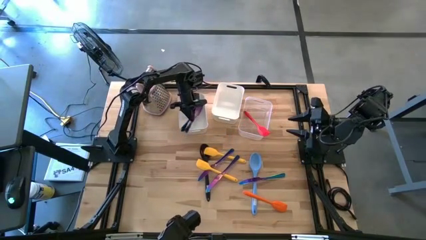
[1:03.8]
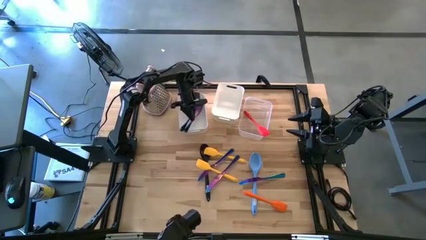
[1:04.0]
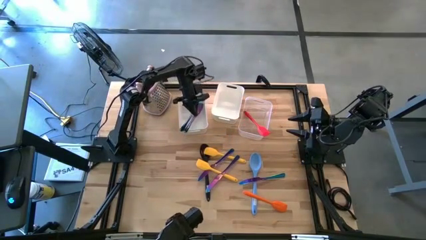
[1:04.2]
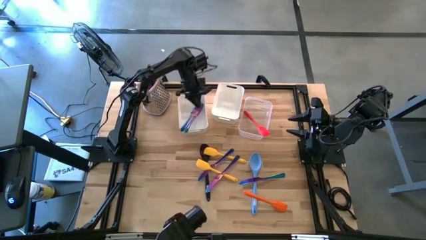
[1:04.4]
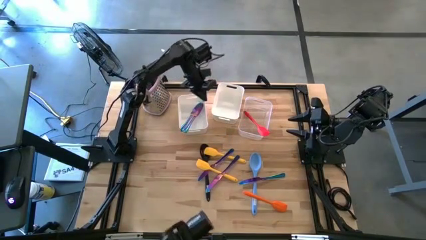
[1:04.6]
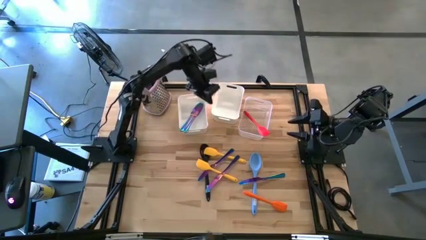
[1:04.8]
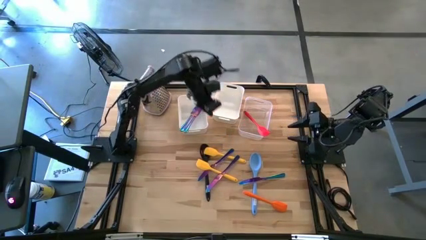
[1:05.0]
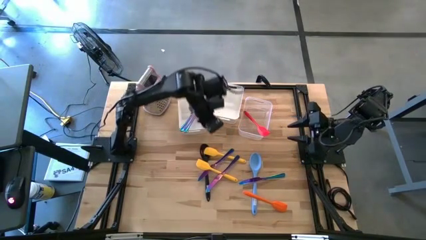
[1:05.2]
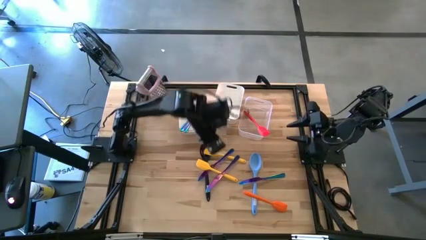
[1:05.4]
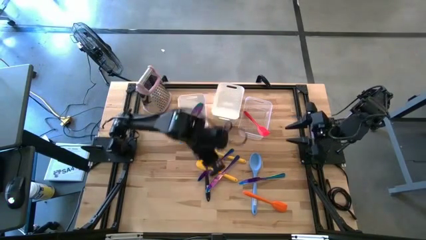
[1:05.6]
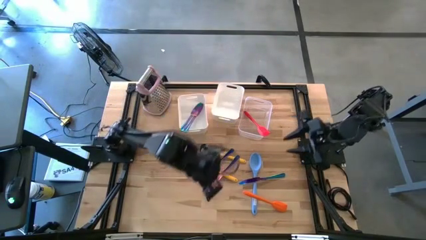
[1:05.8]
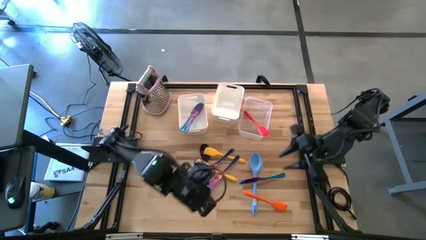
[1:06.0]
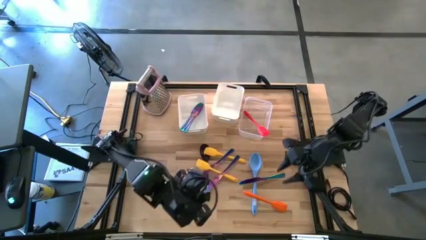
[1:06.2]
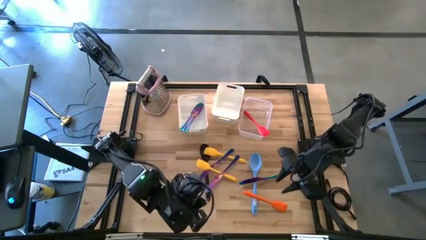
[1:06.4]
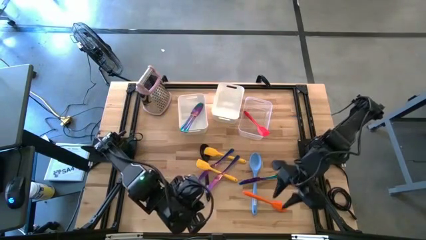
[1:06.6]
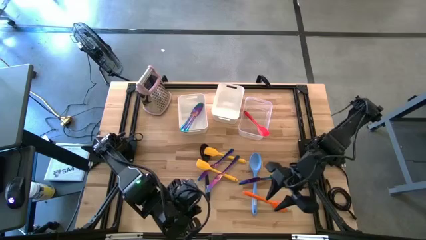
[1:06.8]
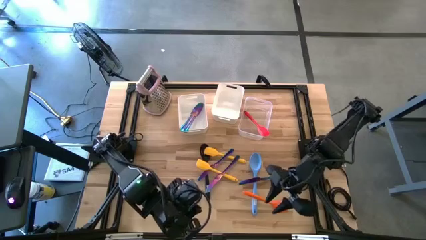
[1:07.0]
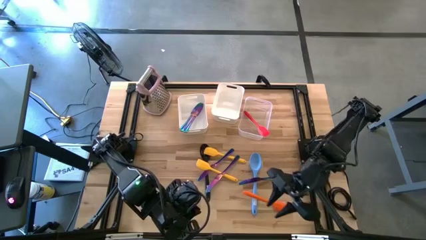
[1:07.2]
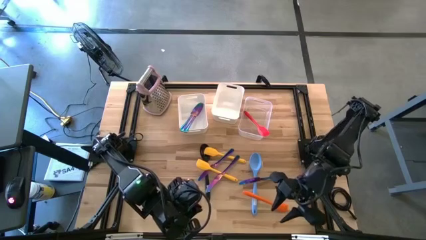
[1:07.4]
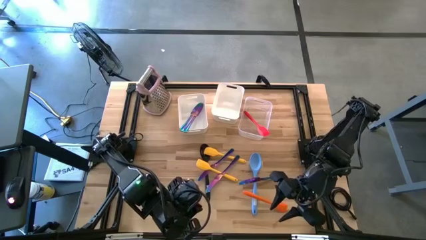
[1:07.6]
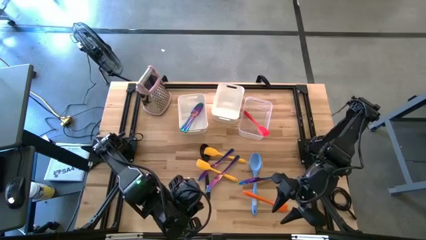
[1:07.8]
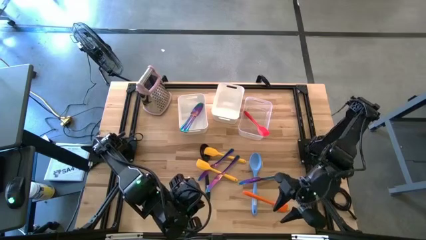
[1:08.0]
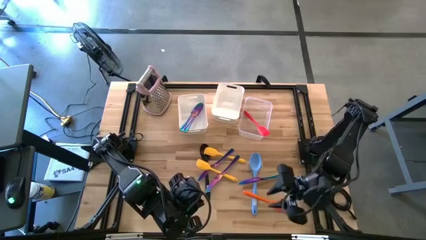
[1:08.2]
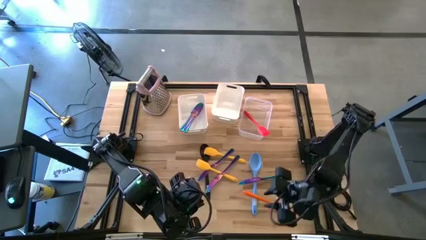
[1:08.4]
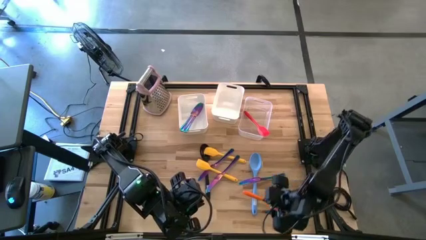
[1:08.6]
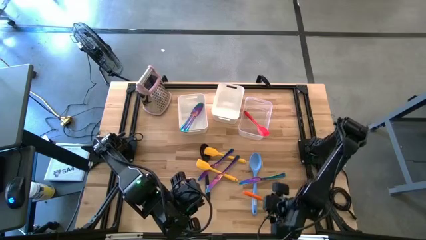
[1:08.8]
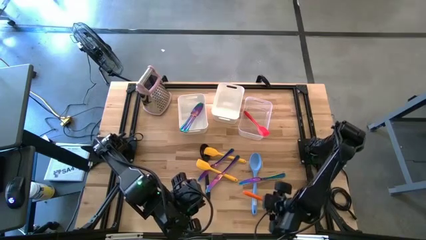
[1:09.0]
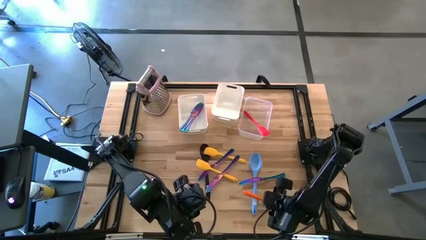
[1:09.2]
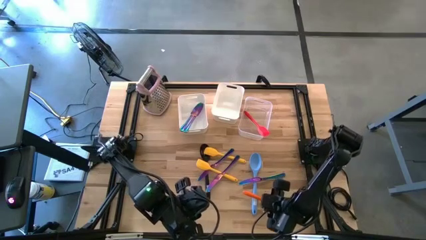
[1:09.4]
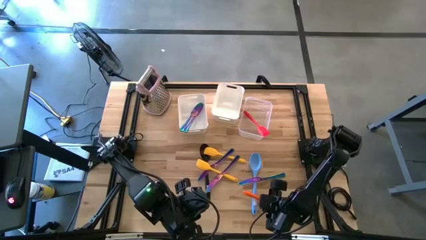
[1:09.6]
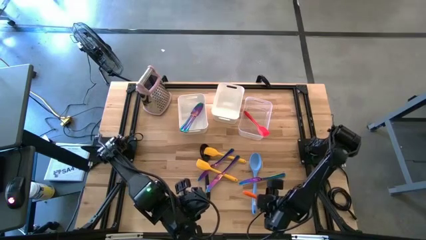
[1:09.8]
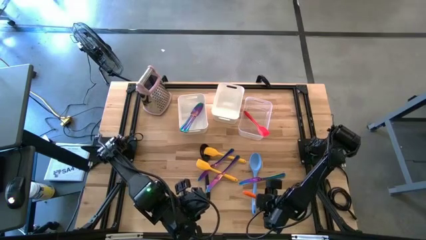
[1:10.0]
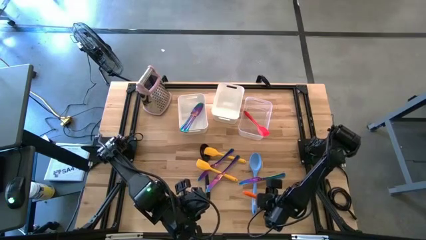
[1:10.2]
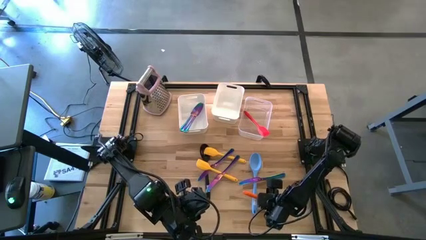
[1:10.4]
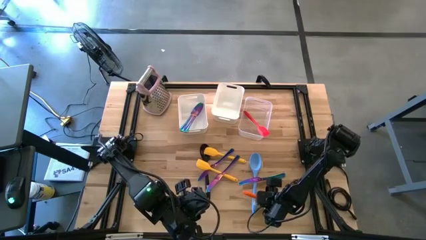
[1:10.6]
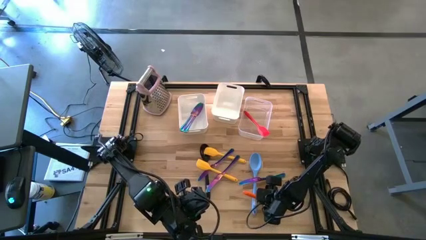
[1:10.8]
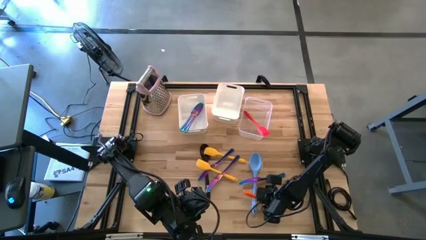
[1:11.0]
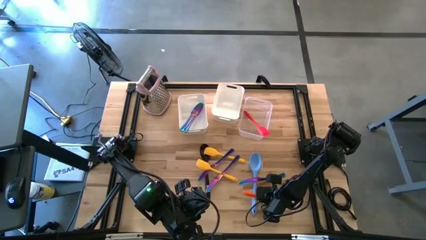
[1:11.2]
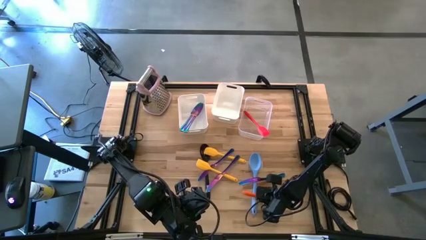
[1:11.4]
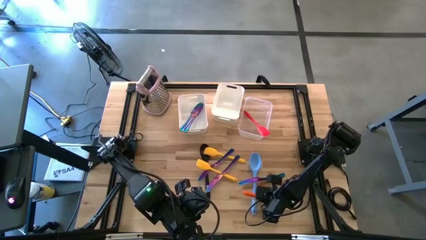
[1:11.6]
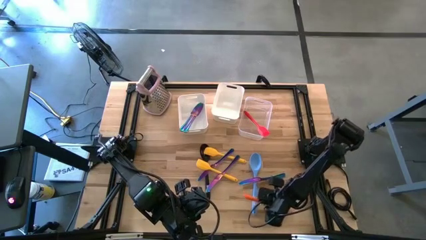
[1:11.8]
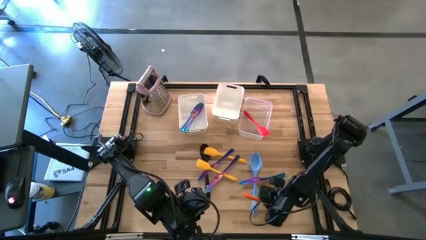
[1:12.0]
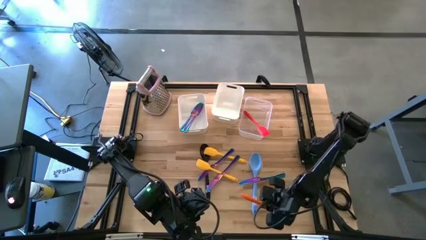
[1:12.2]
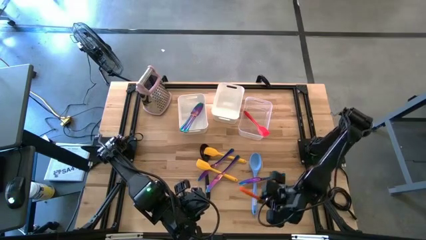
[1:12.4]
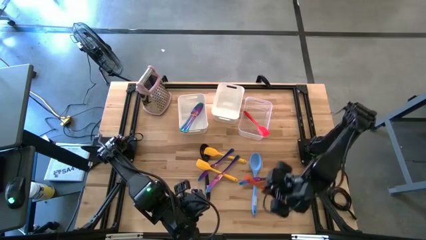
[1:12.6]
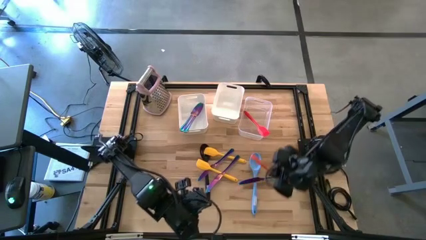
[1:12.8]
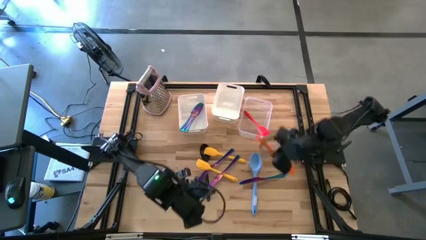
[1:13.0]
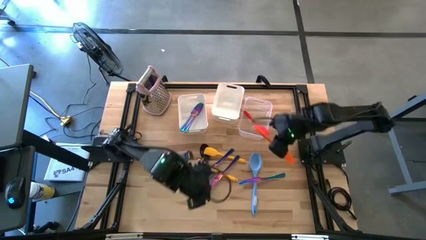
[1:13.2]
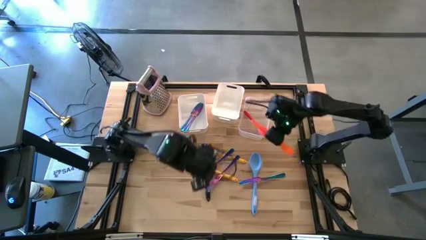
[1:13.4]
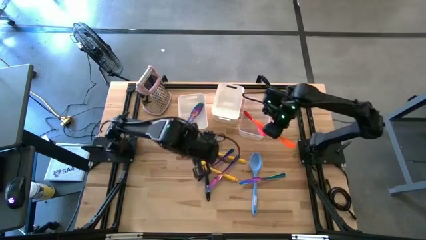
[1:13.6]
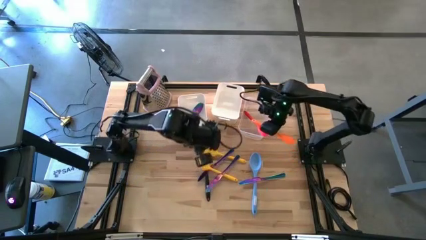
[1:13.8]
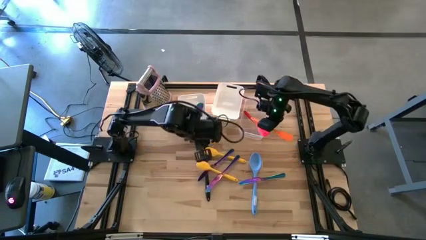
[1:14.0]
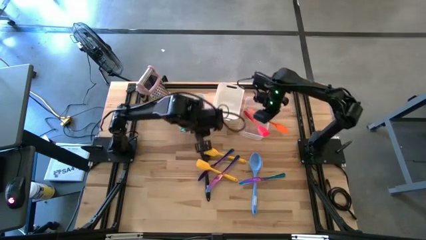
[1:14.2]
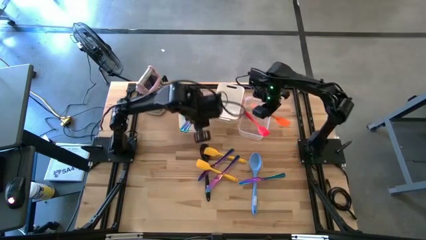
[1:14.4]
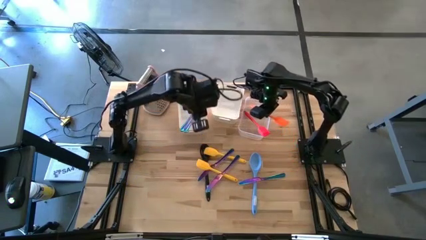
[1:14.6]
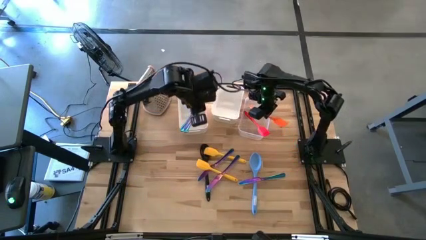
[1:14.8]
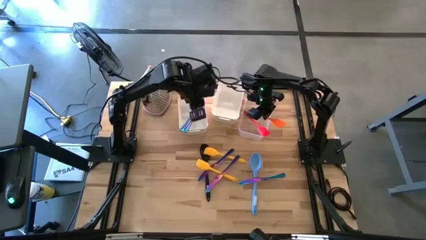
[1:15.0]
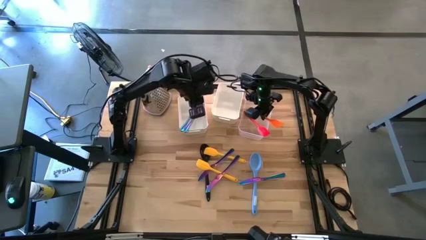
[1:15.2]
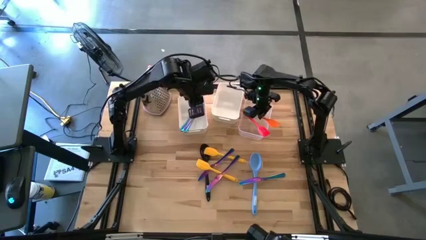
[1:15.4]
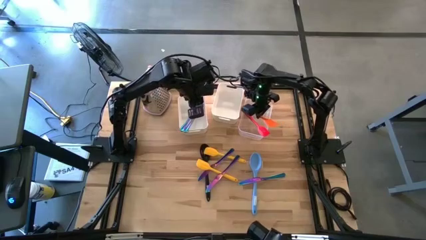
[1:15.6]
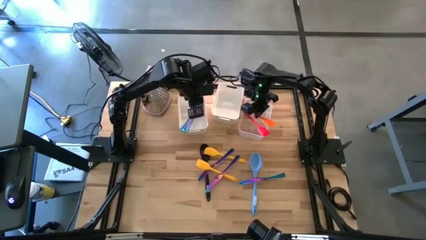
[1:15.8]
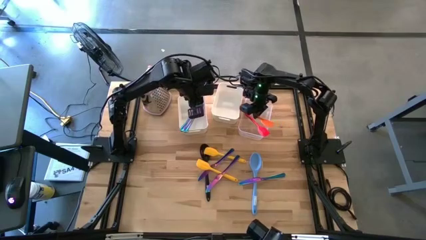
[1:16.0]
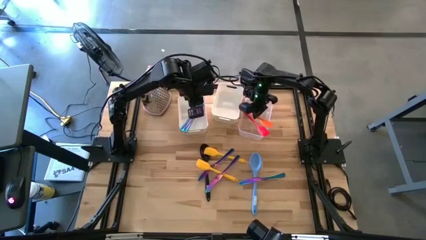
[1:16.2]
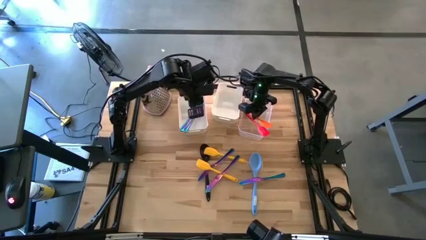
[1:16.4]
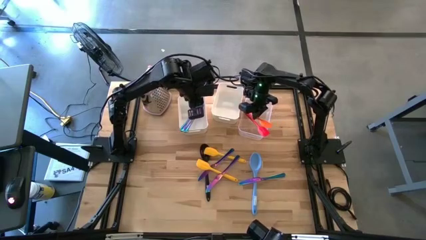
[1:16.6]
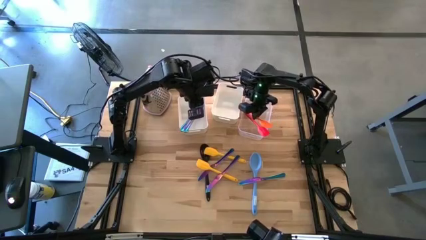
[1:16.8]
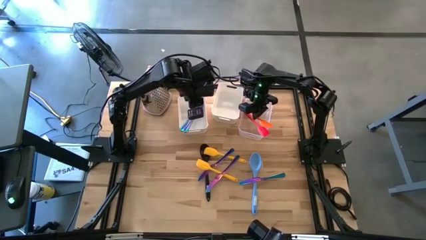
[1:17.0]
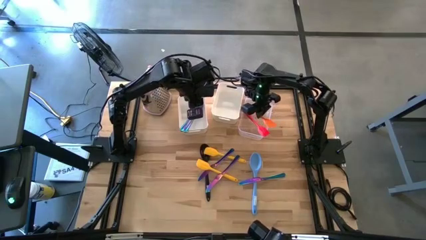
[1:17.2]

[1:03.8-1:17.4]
Task: Pick & Place Kitchen Items
Put the orange spatula into the transparent bin
